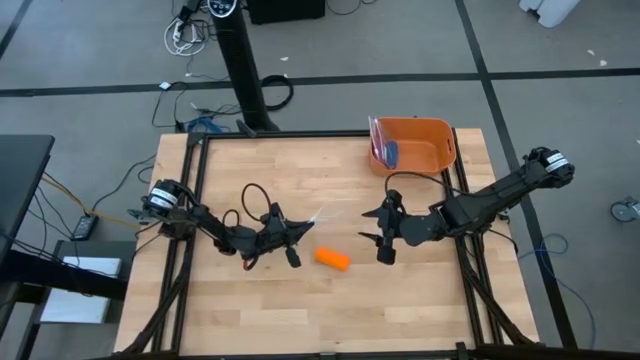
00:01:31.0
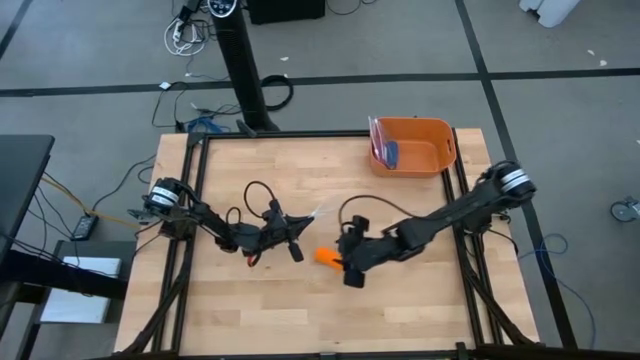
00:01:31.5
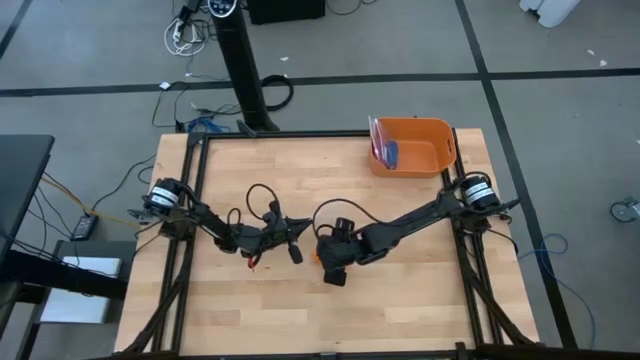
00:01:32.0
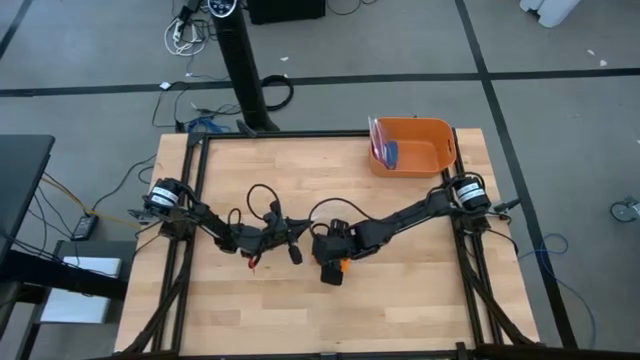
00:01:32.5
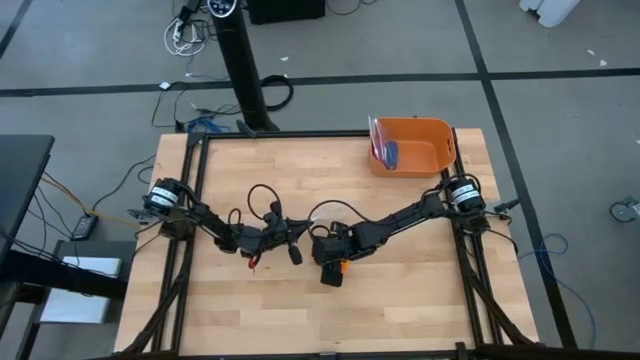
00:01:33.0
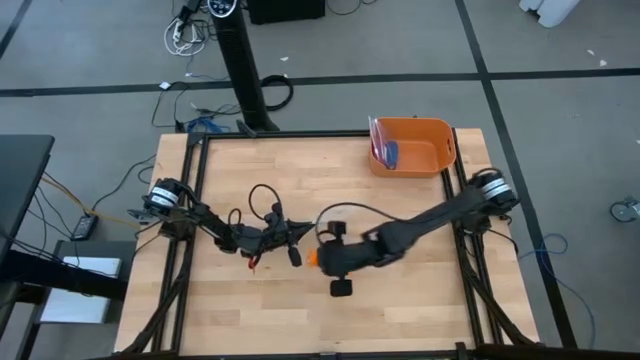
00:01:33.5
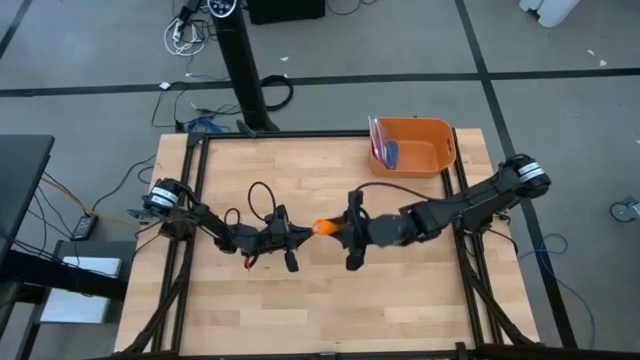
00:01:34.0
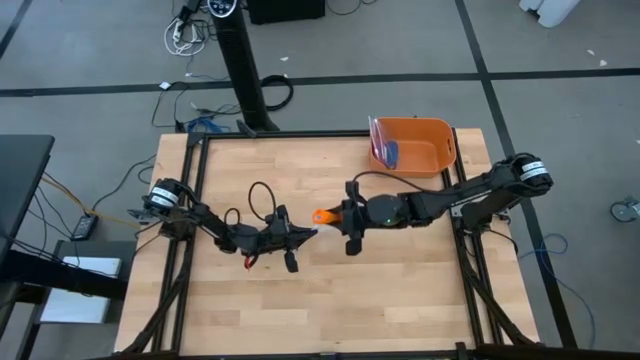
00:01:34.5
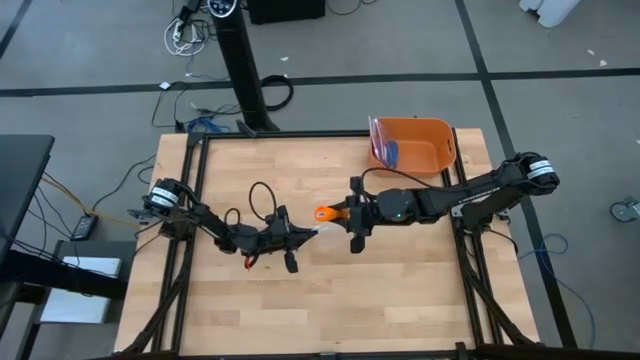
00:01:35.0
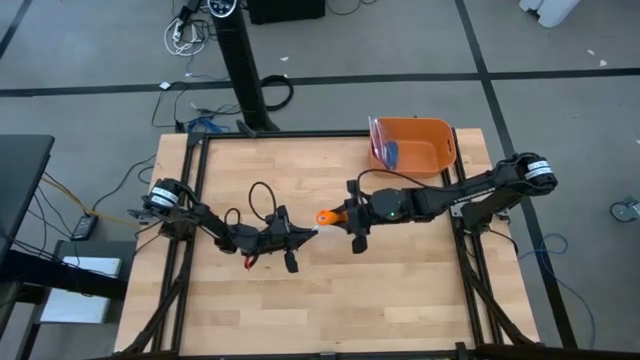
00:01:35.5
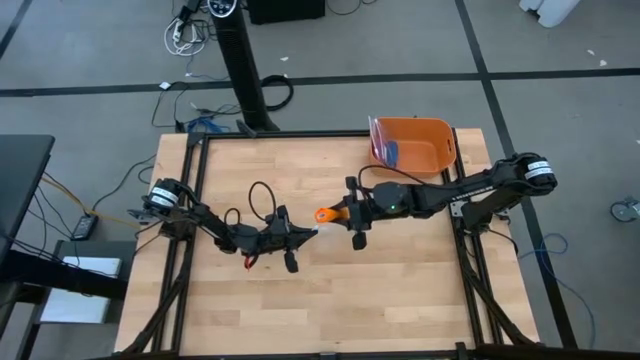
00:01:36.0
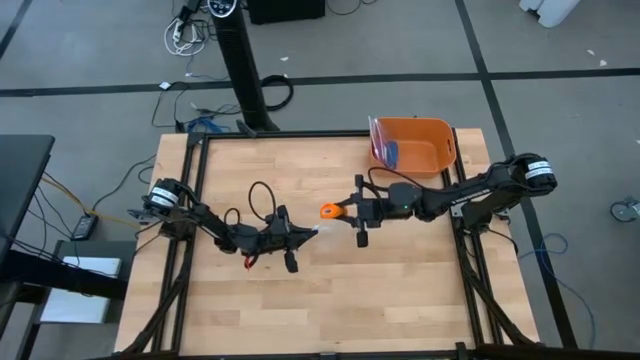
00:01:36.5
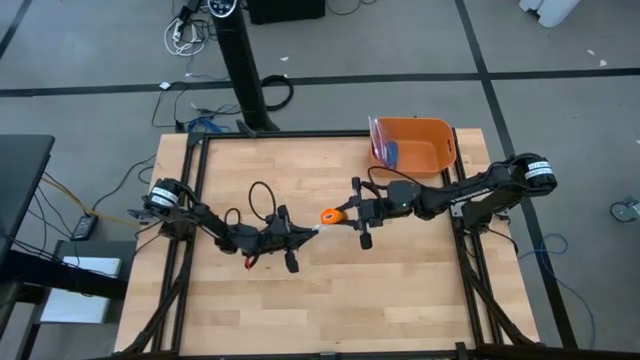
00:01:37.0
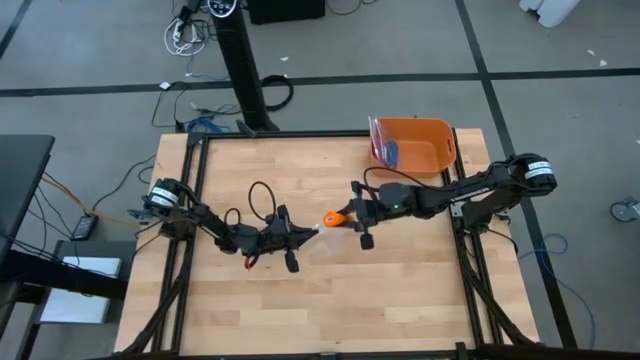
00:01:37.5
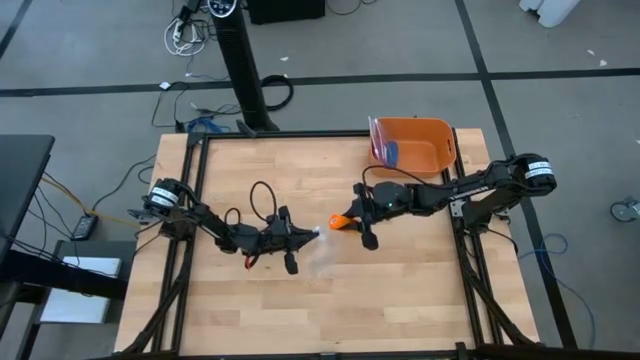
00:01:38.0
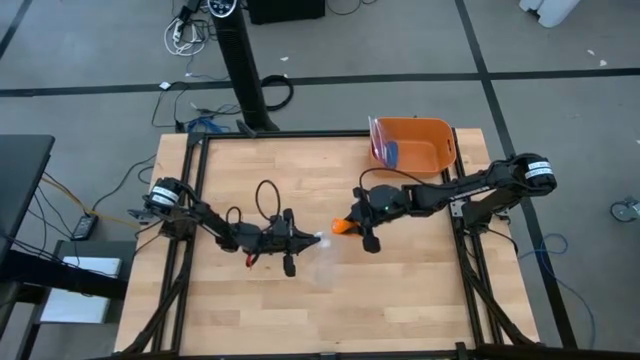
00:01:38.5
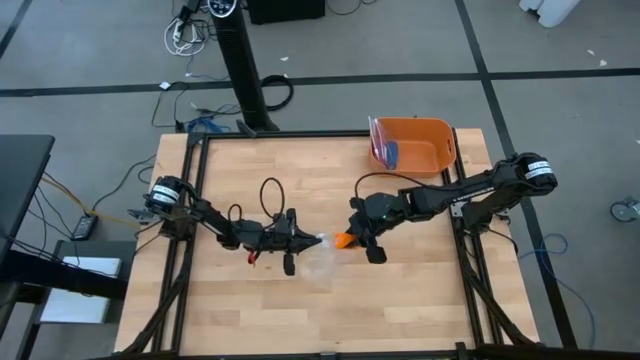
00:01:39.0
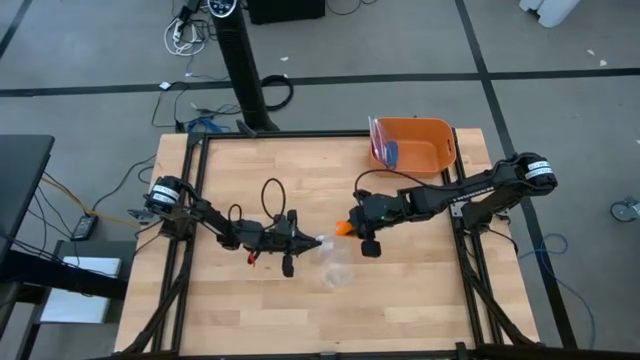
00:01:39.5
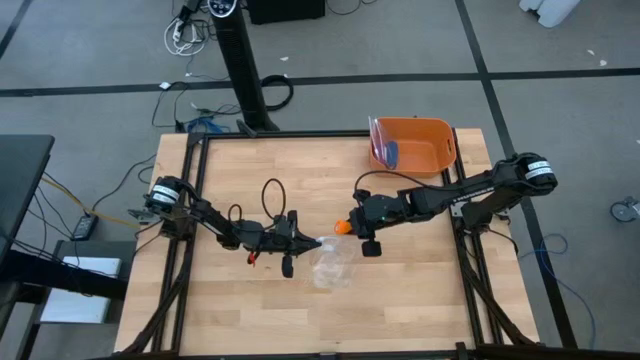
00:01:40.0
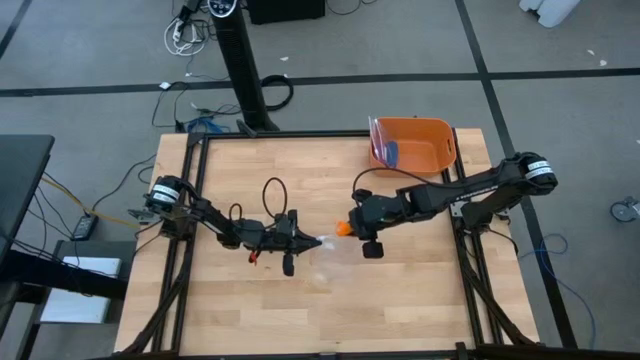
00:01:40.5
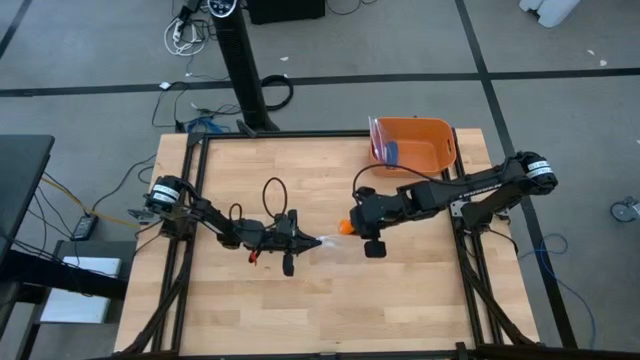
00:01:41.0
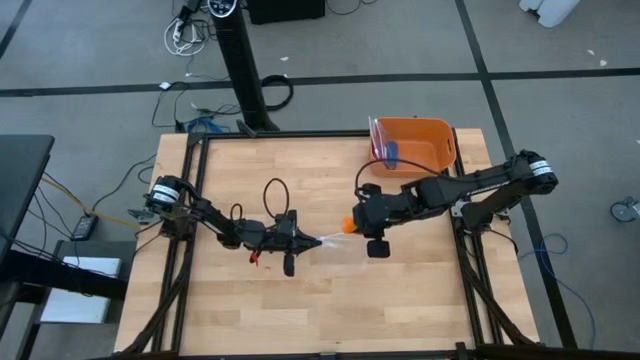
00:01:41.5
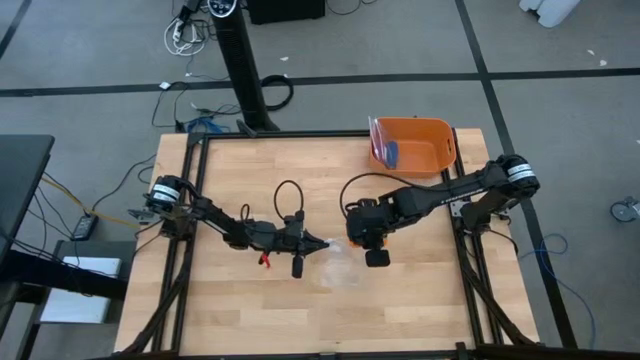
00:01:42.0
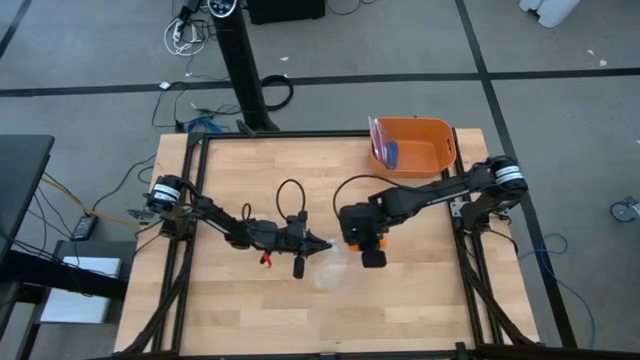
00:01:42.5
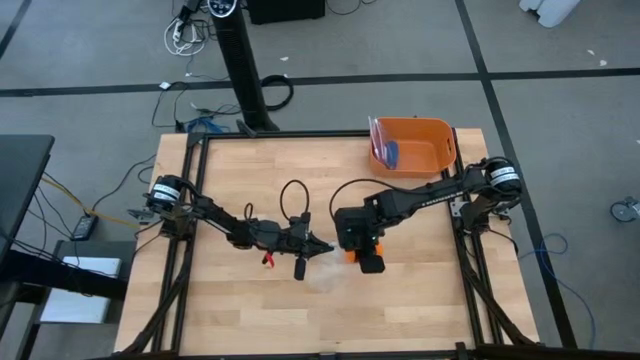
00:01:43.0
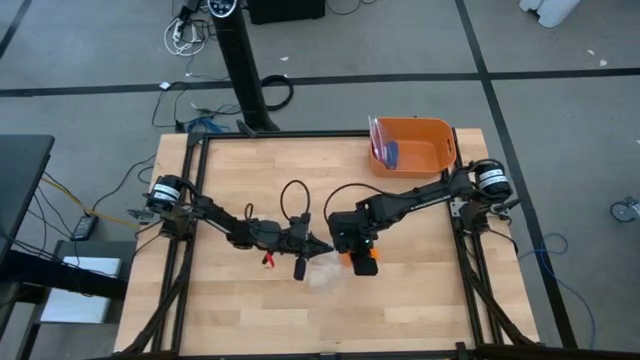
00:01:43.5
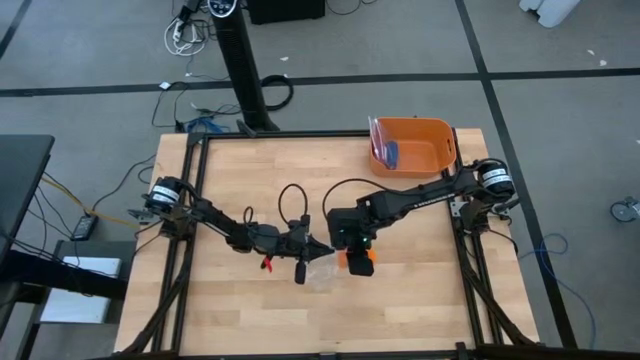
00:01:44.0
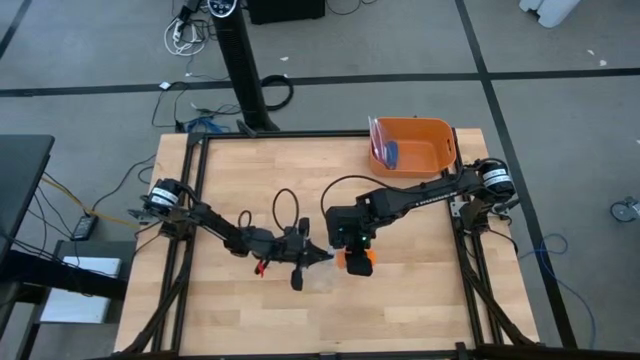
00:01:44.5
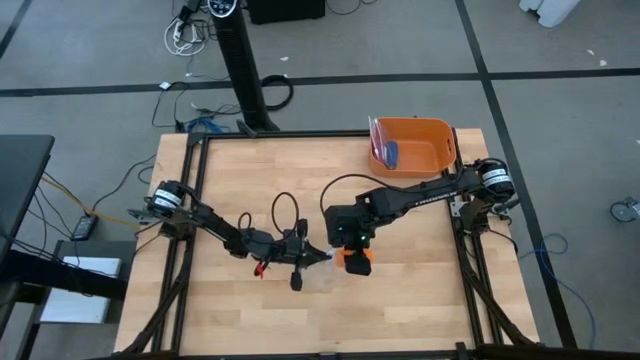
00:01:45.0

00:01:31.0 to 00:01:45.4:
Task: Roll bandage
Put the rolled orange bandage into the transparent zip bag

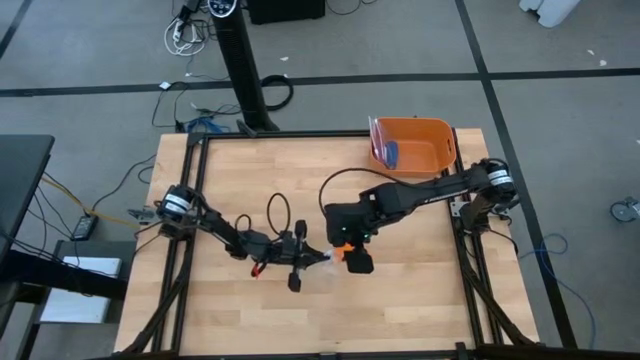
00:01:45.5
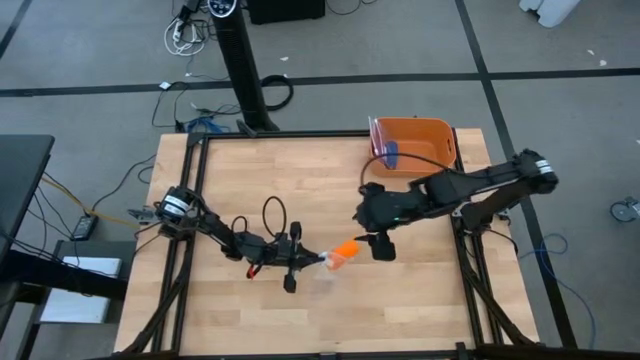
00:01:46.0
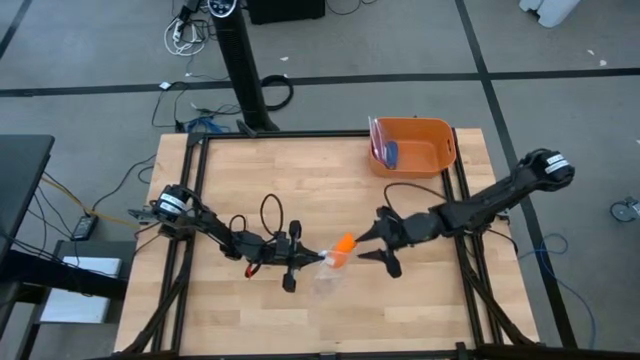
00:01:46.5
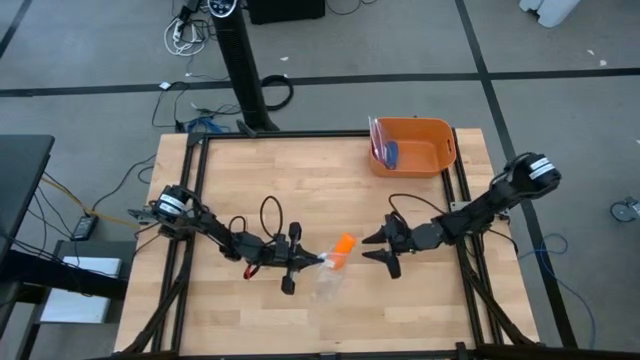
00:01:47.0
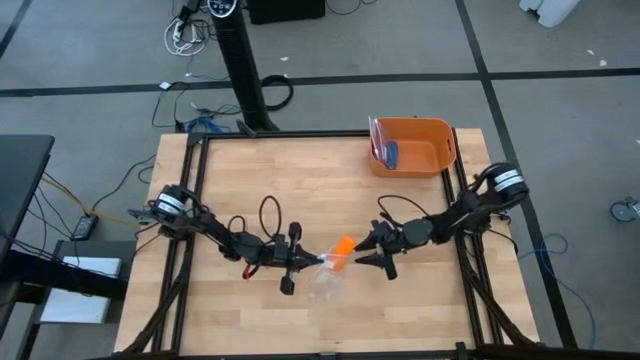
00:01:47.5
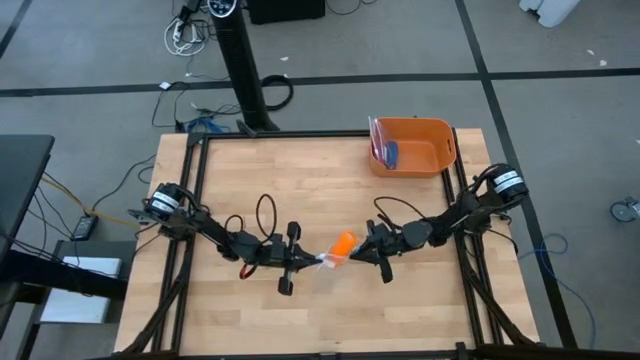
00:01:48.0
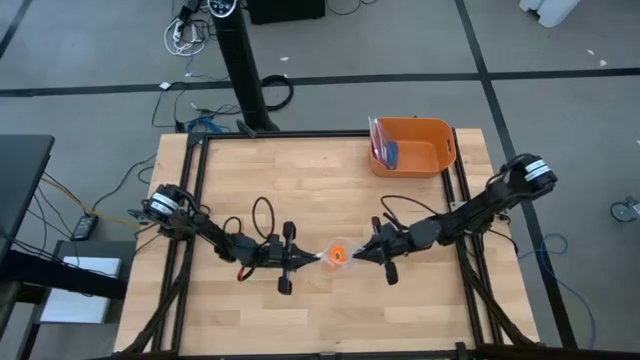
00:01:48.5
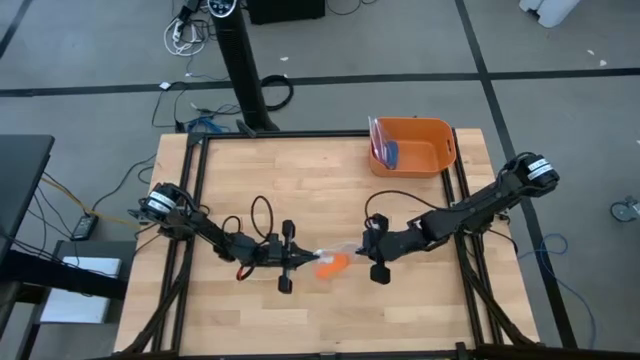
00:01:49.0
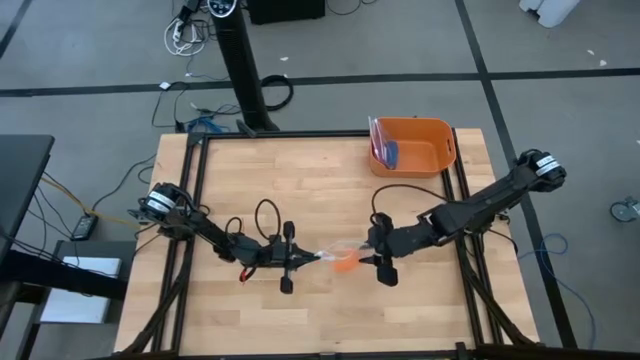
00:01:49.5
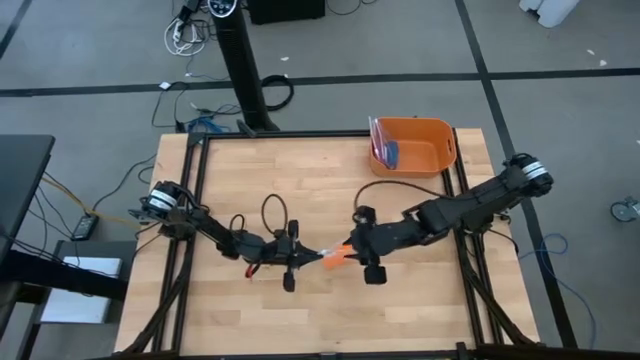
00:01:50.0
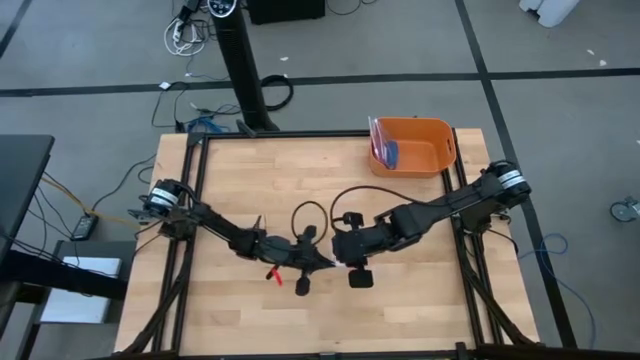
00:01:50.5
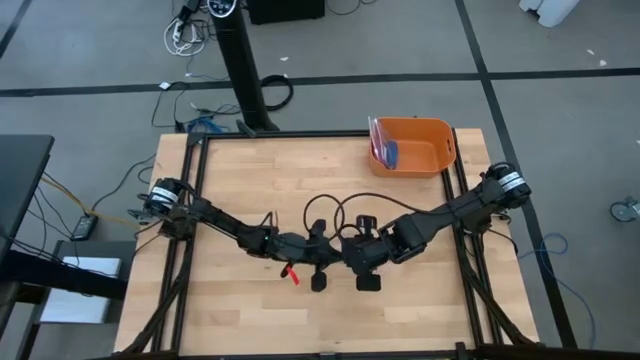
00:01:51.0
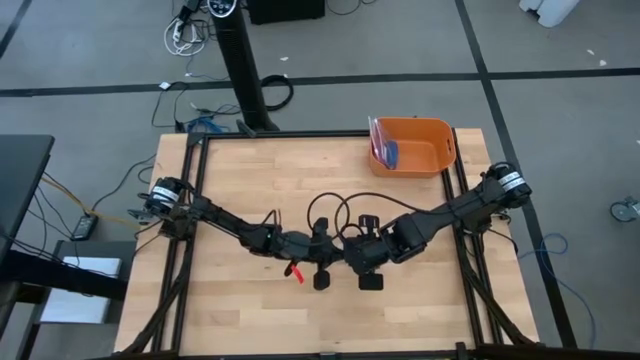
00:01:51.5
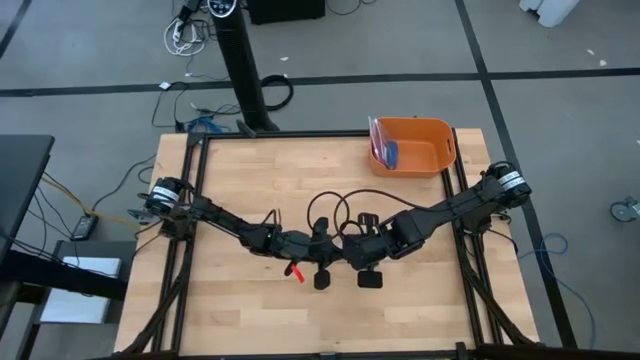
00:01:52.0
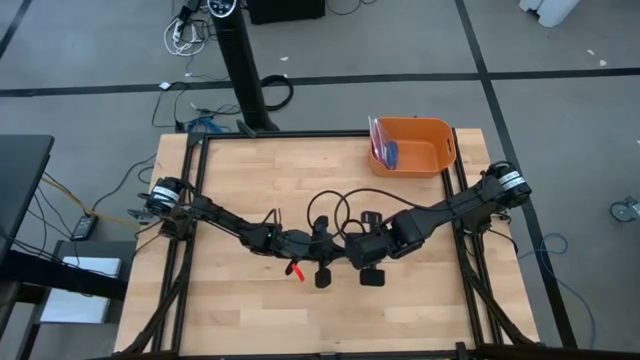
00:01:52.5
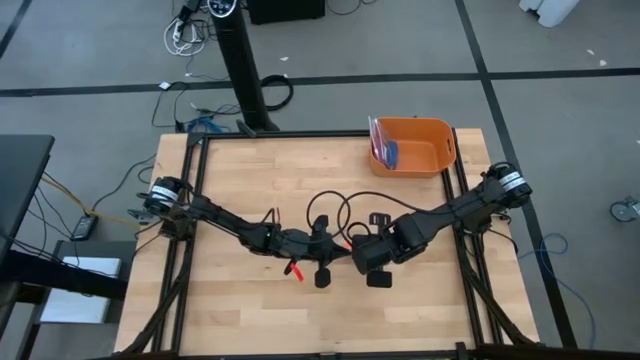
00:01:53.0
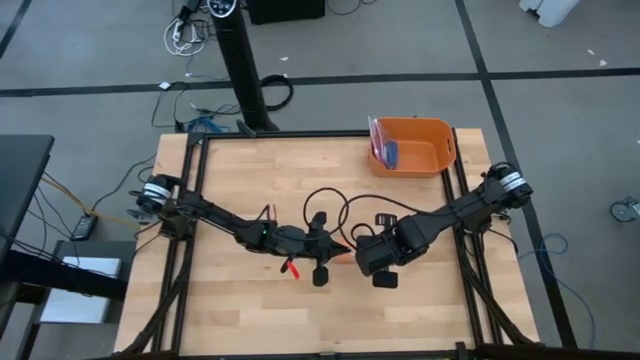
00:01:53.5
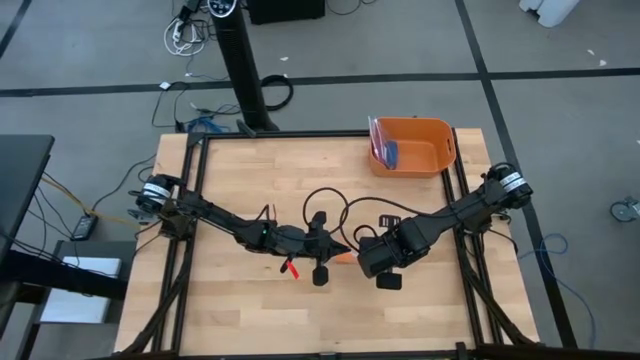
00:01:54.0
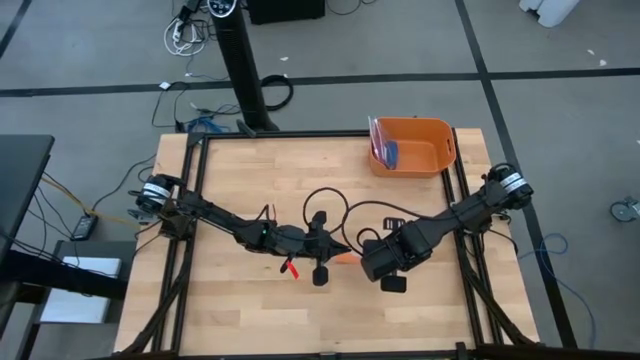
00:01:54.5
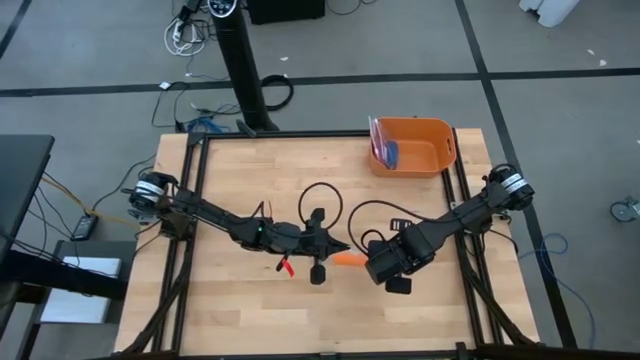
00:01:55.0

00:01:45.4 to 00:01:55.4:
Close the transparent zip bag
